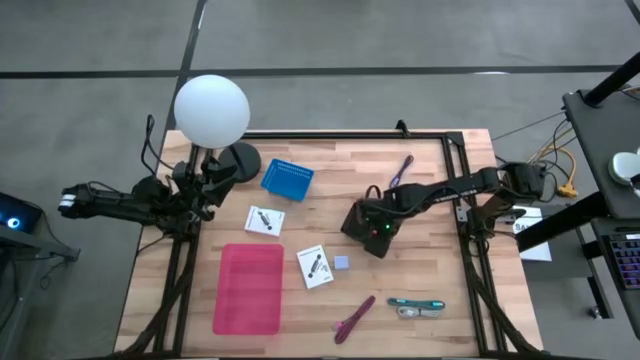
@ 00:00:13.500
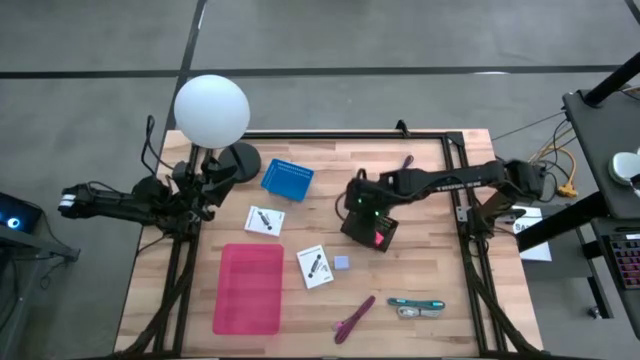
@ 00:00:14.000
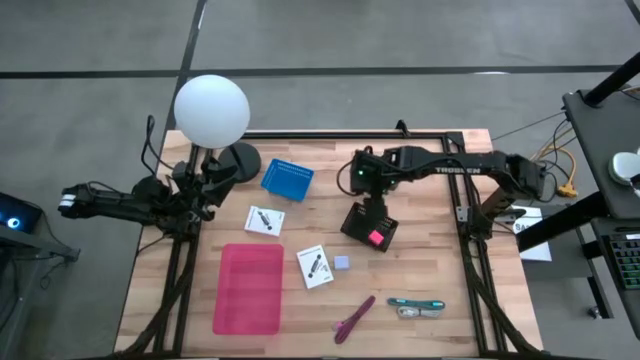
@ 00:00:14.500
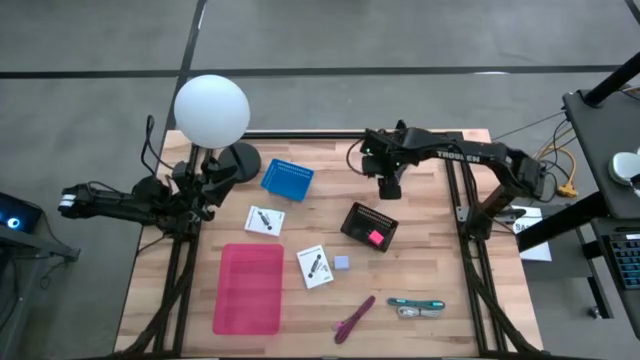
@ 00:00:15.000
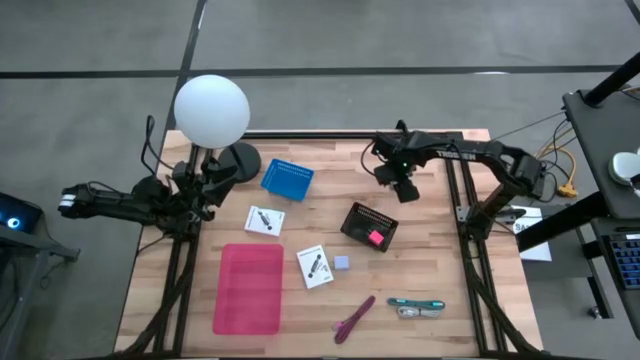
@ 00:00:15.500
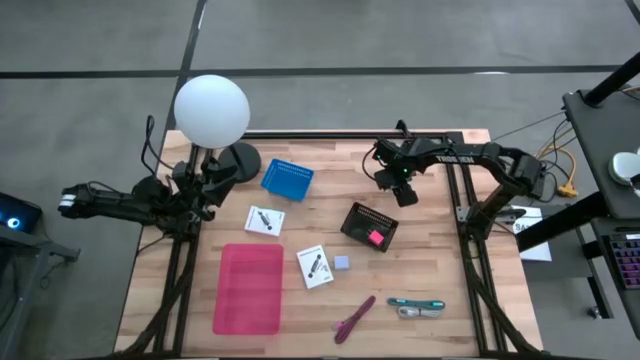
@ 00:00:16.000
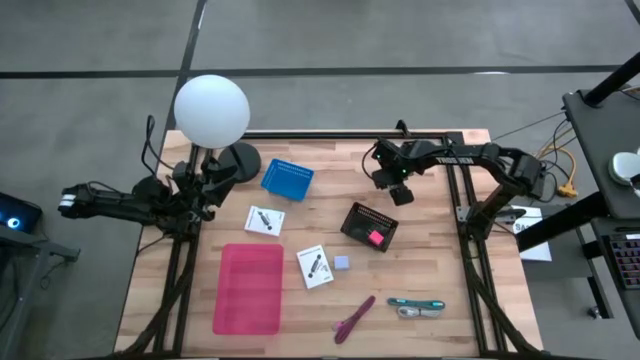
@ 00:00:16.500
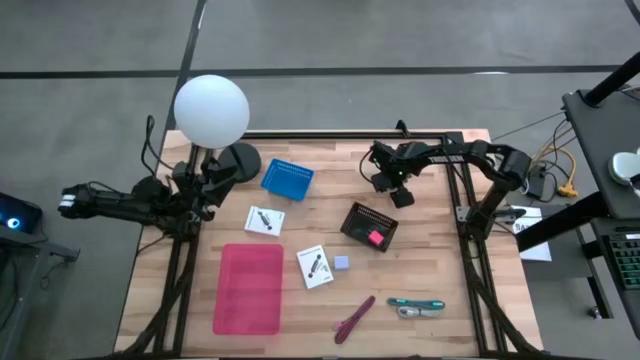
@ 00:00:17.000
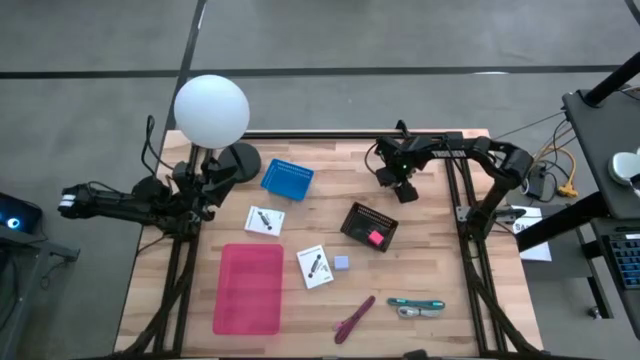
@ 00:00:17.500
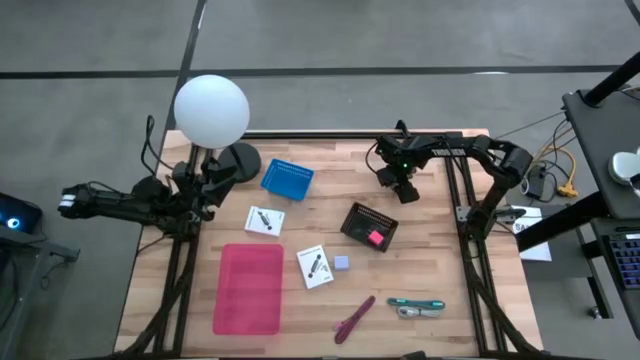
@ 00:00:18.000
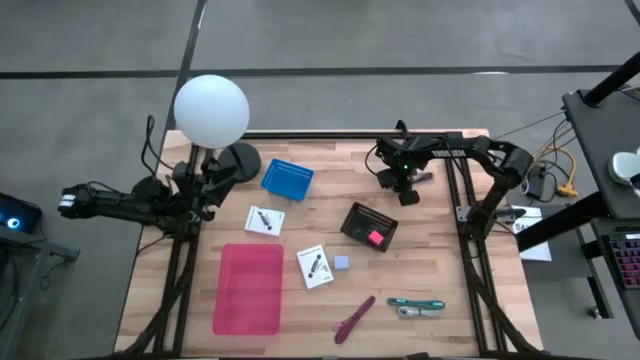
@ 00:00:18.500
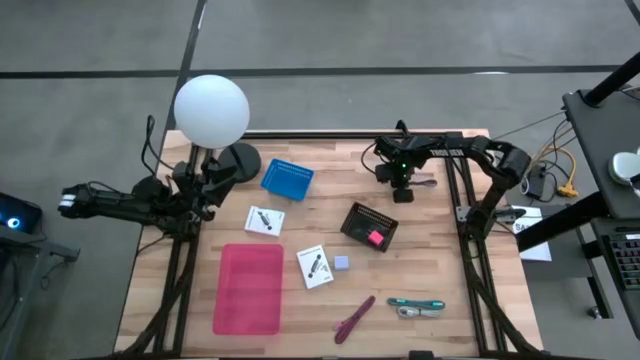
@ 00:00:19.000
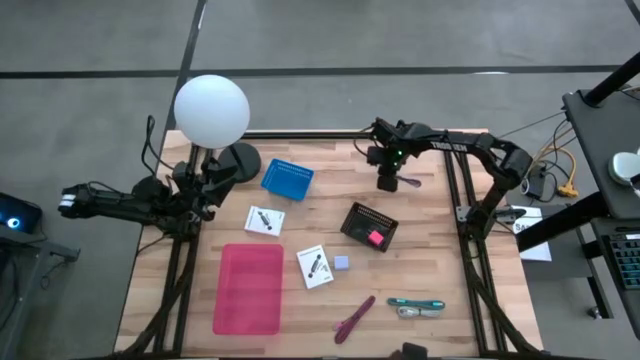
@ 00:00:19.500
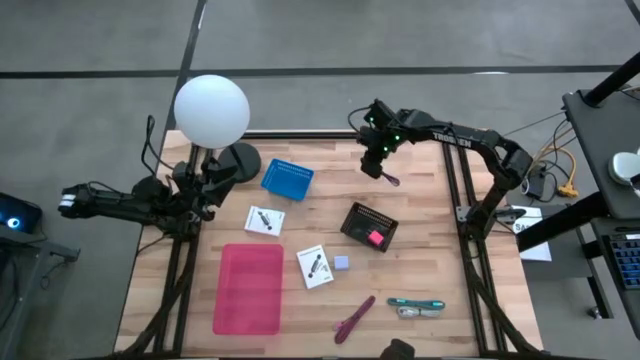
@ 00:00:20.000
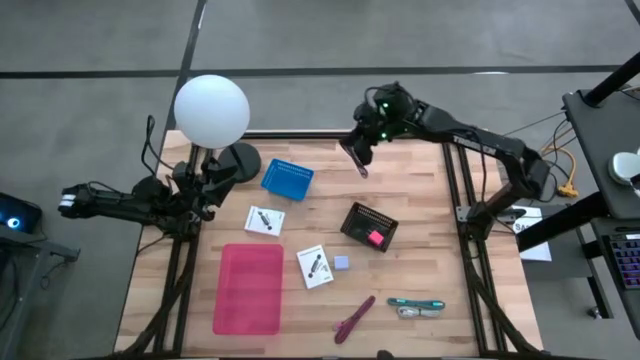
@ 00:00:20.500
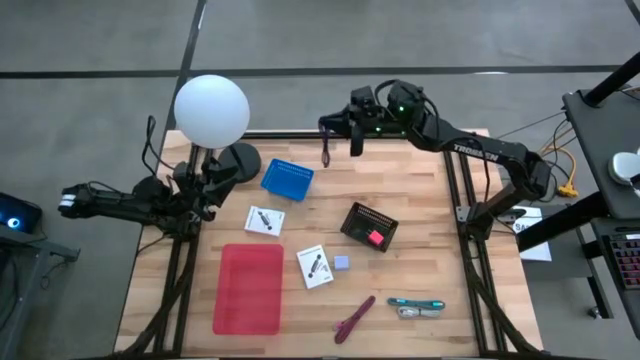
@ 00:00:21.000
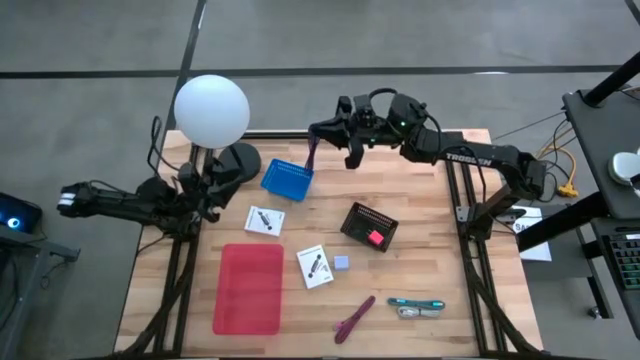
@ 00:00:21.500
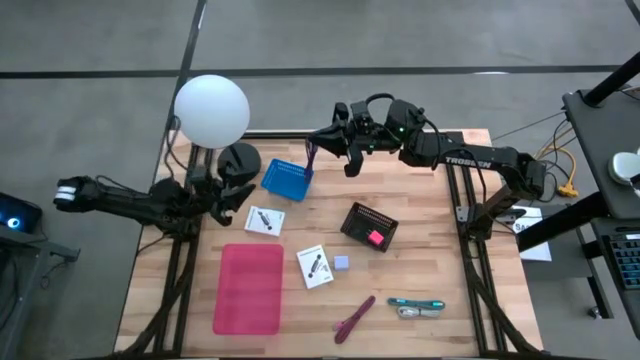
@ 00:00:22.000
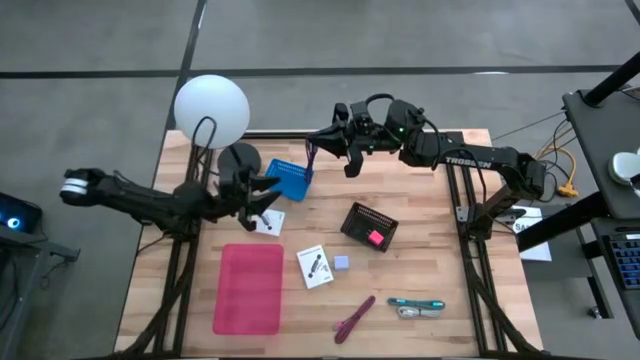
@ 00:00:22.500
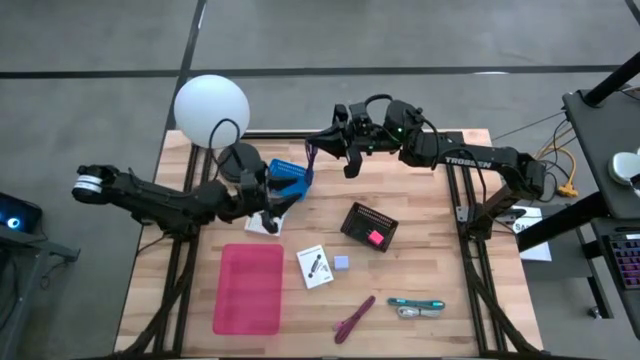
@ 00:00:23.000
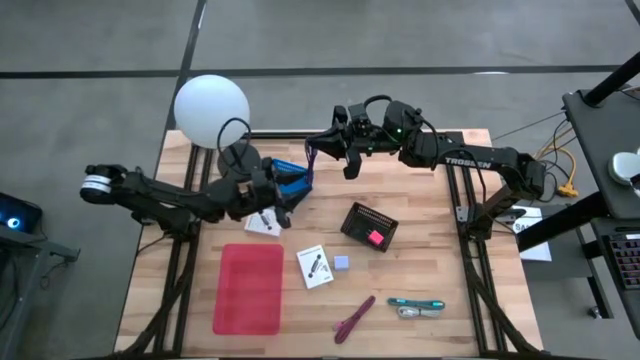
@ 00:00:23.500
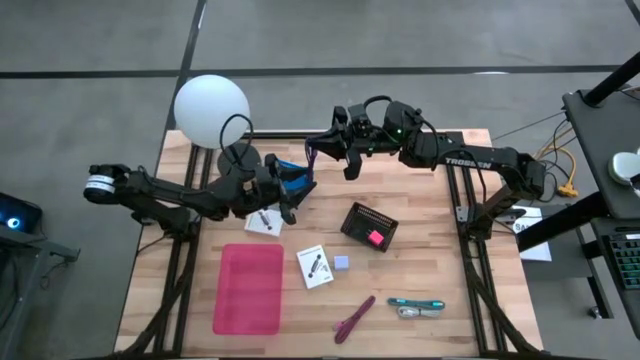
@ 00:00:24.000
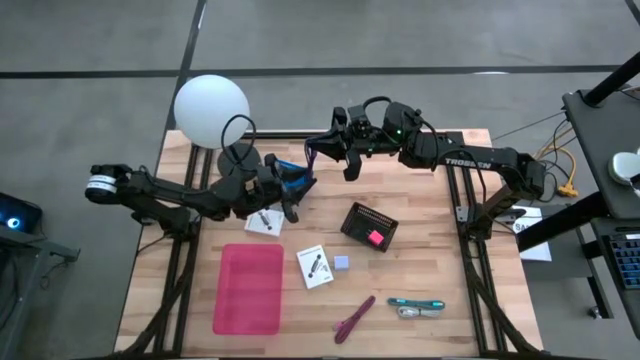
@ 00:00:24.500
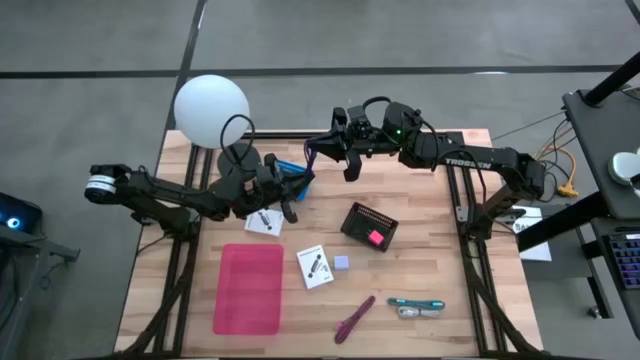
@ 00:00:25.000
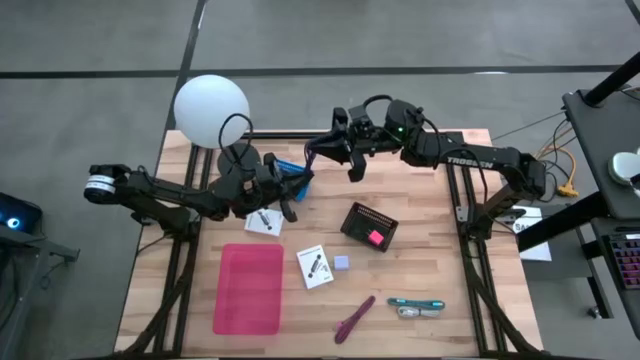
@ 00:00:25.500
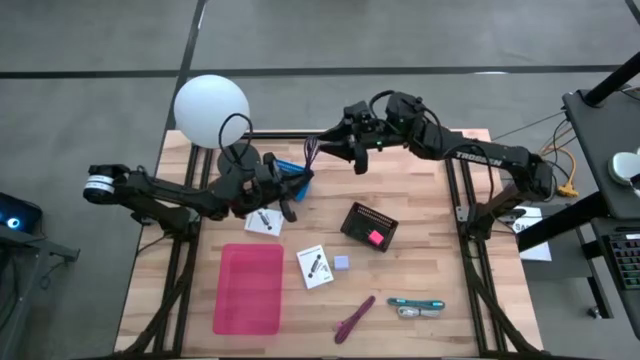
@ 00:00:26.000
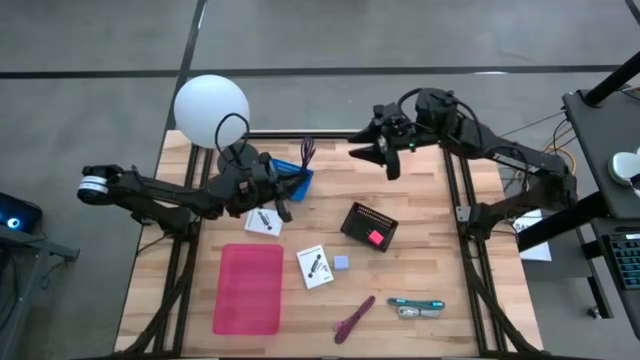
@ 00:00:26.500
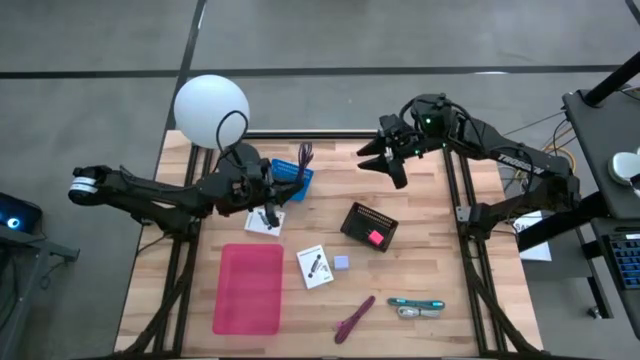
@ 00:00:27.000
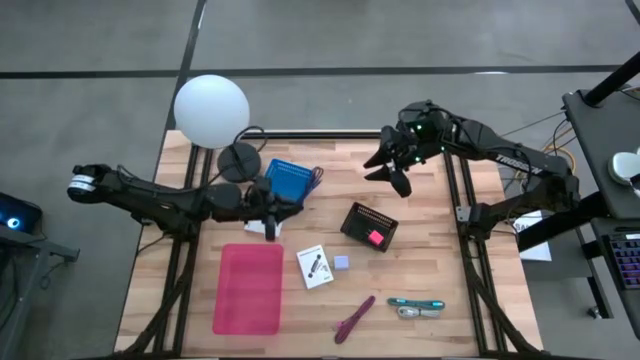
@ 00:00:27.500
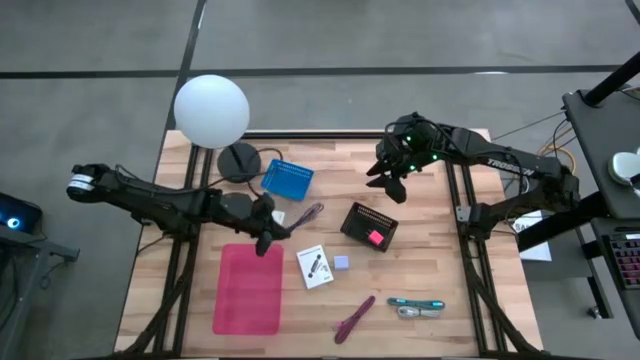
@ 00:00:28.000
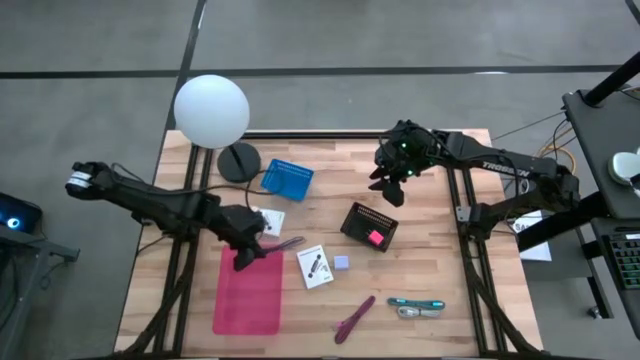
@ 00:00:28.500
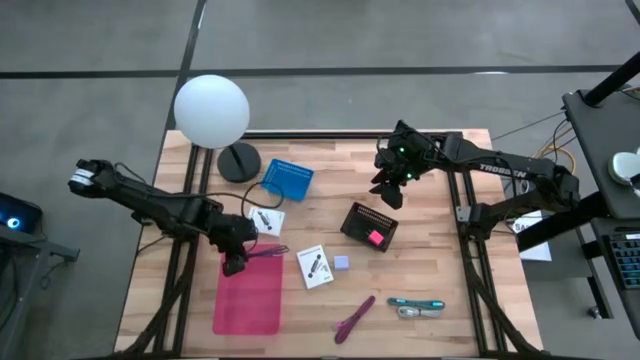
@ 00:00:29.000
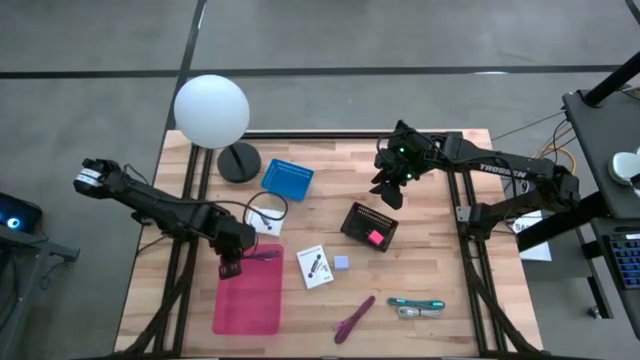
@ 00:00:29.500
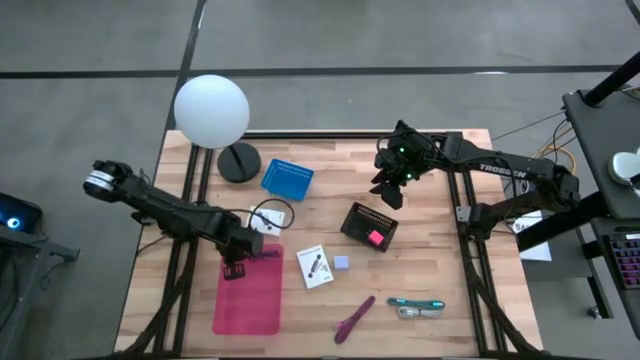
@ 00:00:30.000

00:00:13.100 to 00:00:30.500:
Task: Pick and place items into bin
Put the blue charger cable into the pink bin
